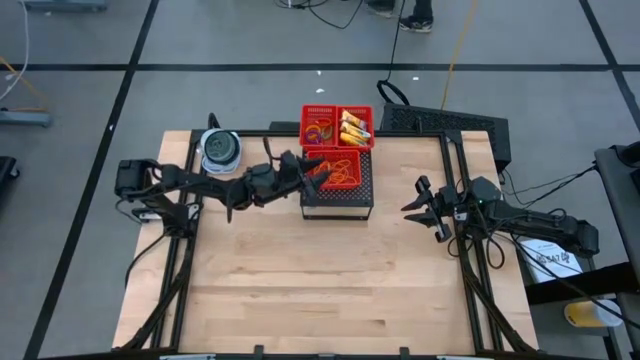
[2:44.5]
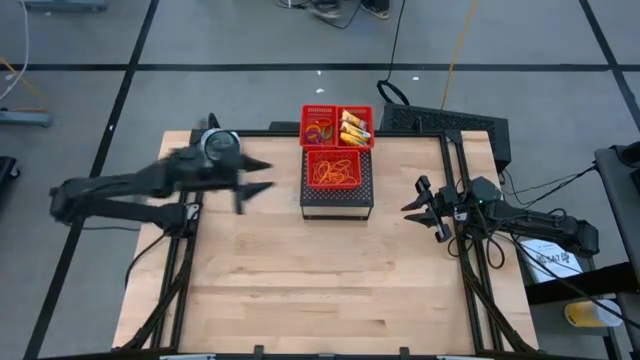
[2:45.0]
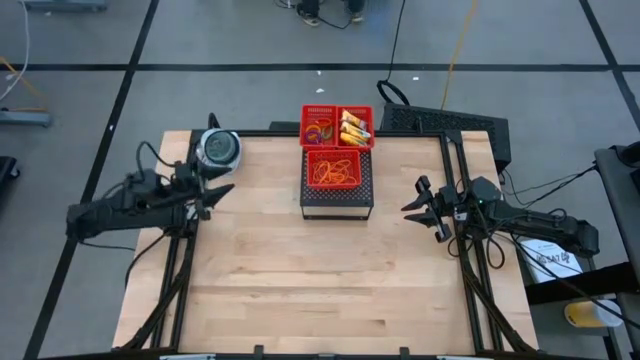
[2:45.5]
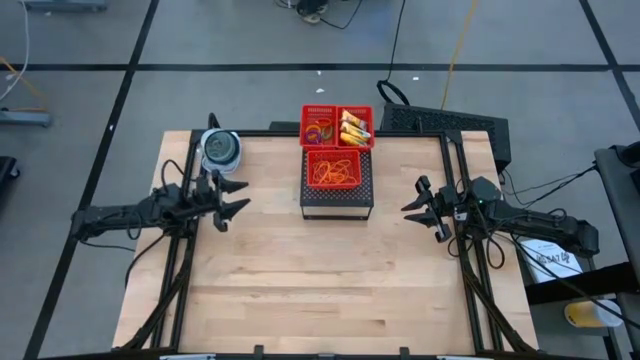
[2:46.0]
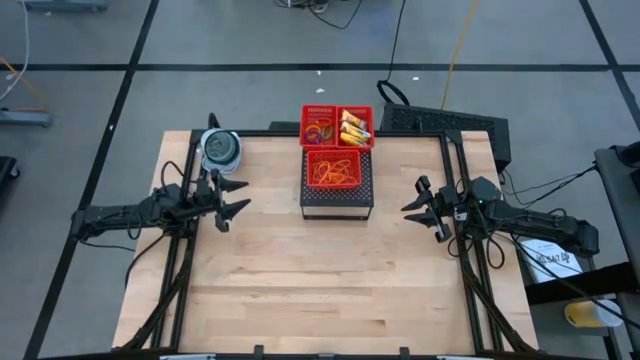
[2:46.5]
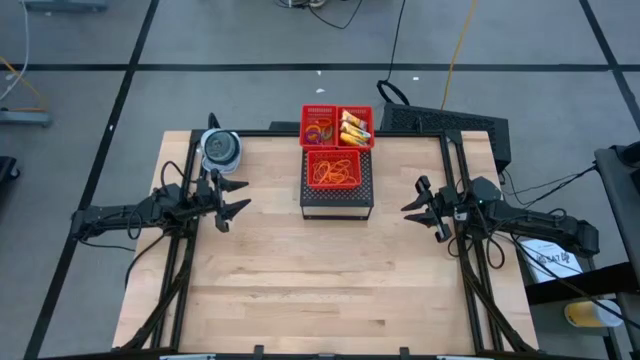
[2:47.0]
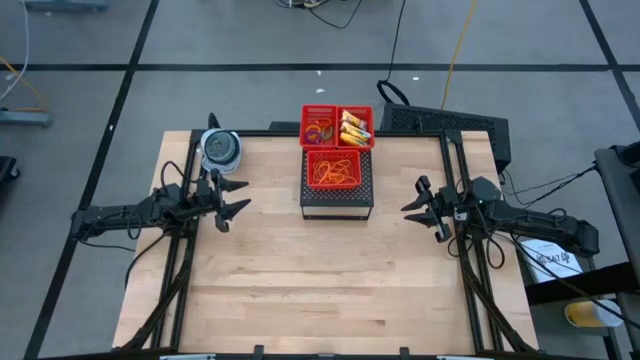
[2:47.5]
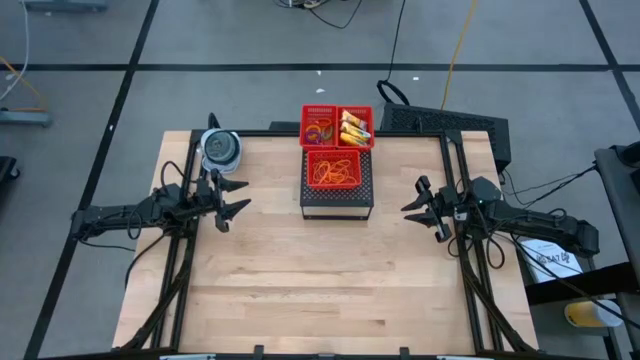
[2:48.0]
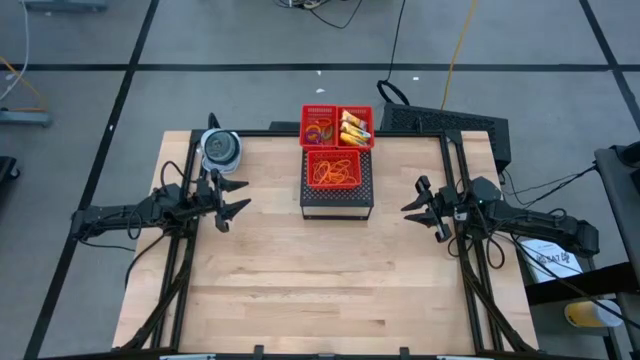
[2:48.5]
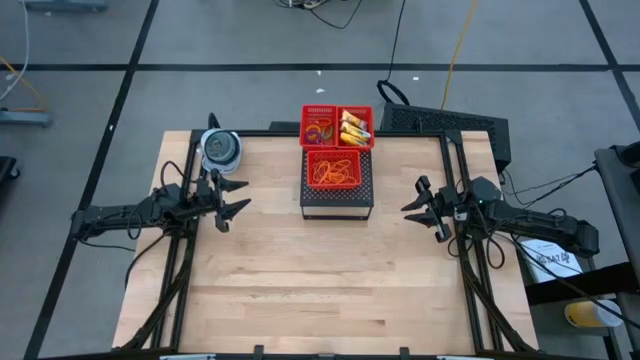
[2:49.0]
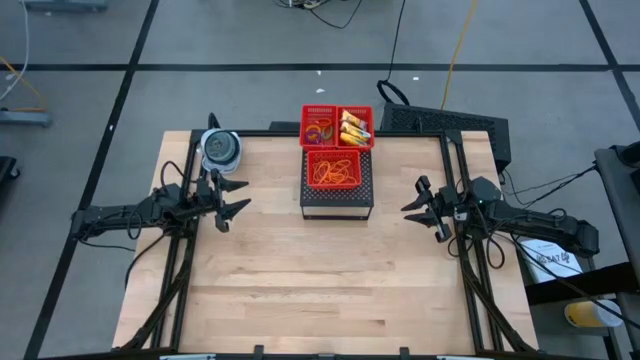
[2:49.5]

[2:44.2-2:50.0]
Task: Pick & Place Office Desk Supplies
Return to Home Position

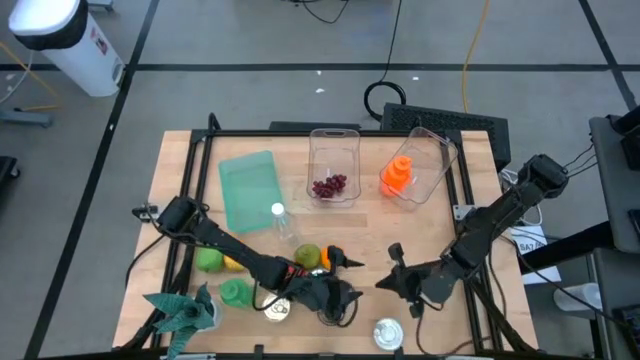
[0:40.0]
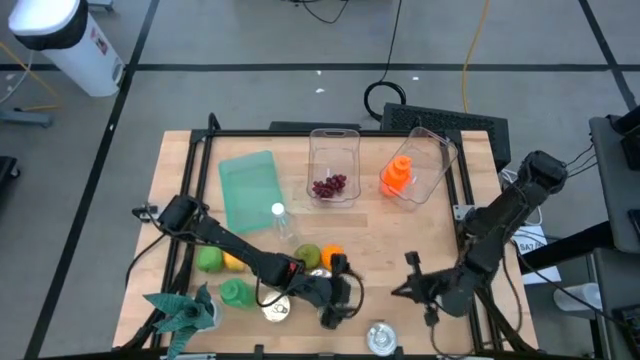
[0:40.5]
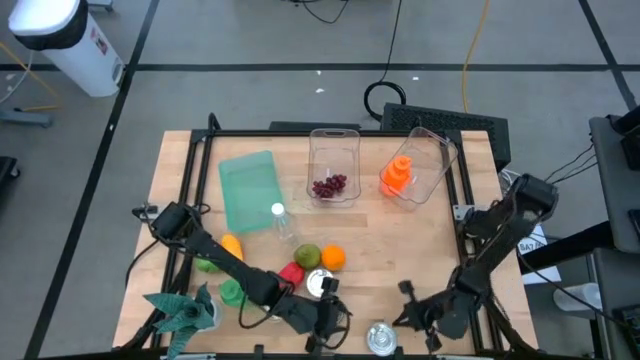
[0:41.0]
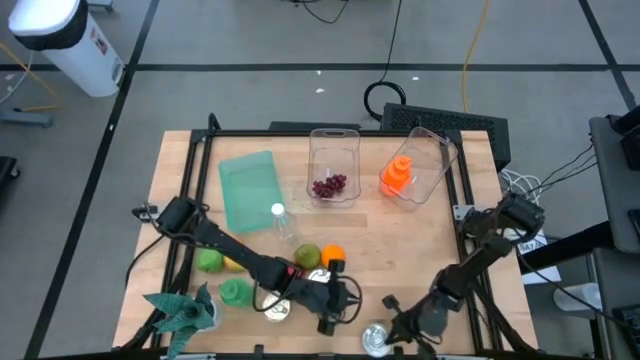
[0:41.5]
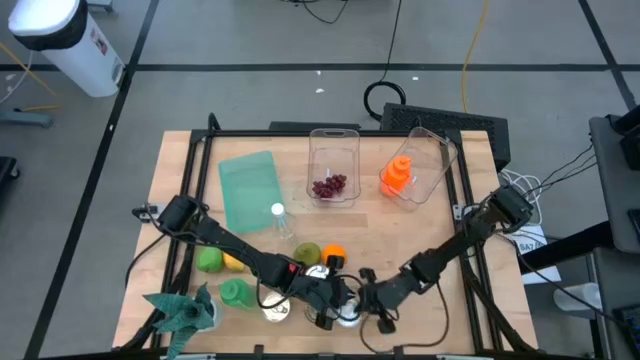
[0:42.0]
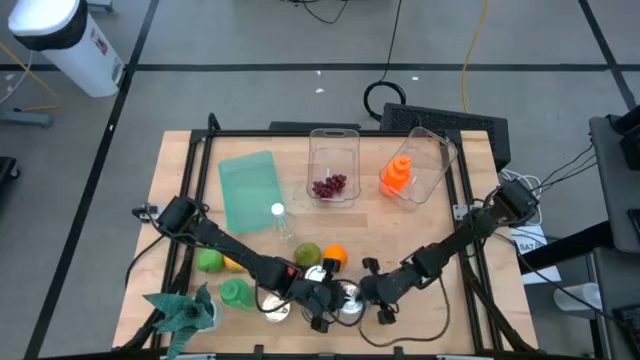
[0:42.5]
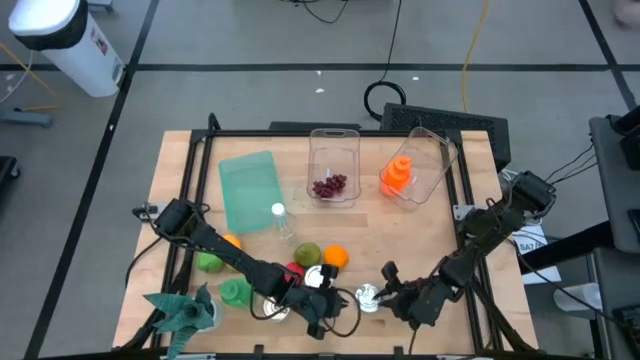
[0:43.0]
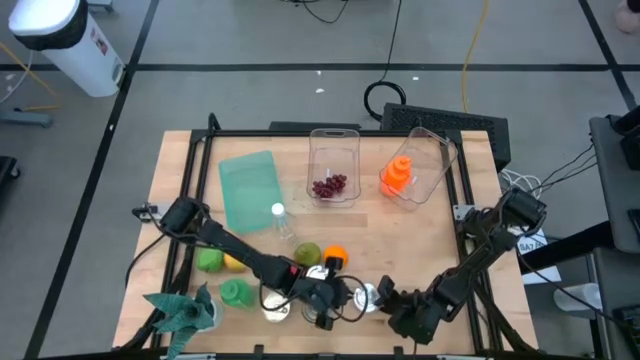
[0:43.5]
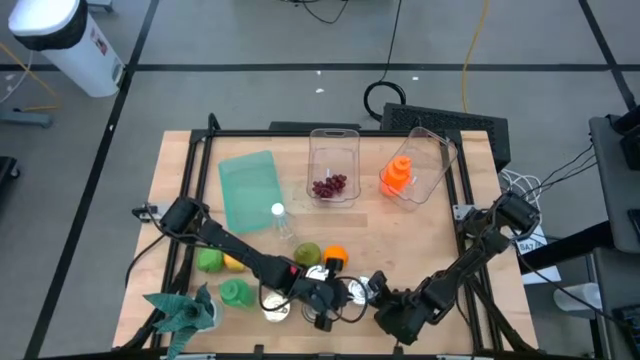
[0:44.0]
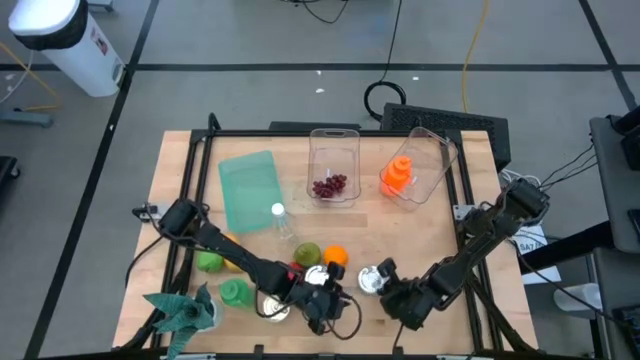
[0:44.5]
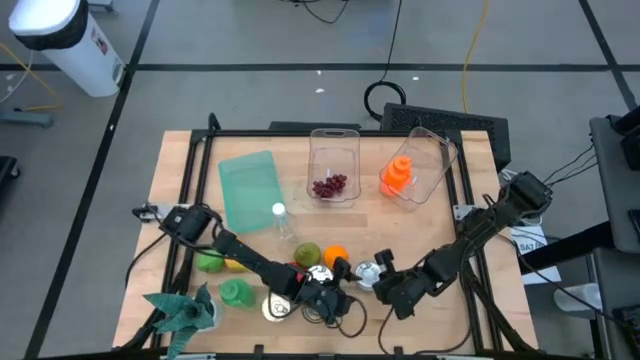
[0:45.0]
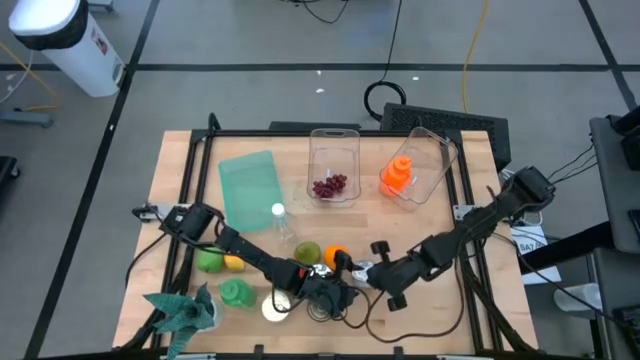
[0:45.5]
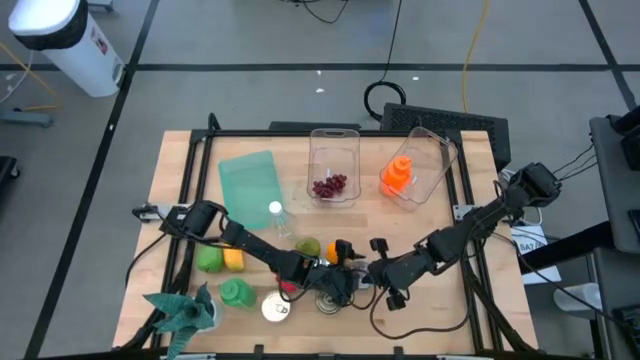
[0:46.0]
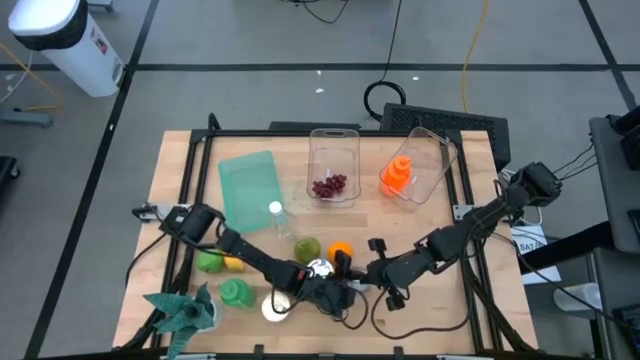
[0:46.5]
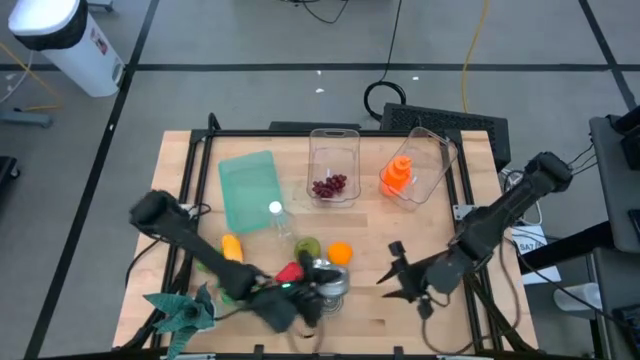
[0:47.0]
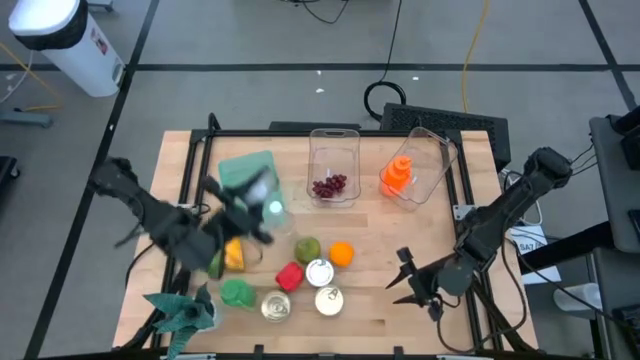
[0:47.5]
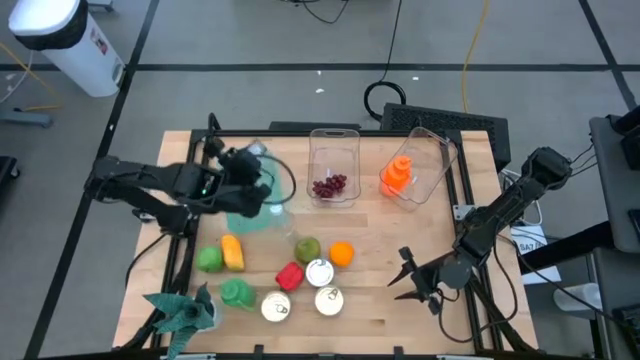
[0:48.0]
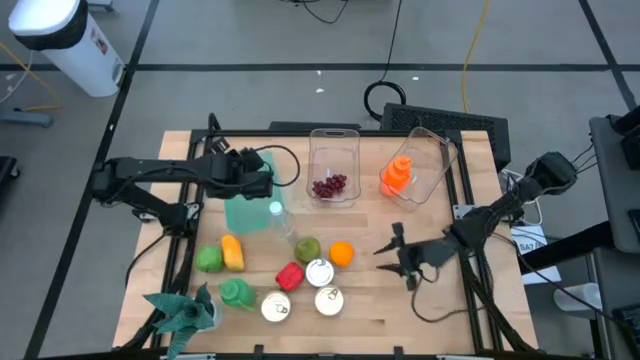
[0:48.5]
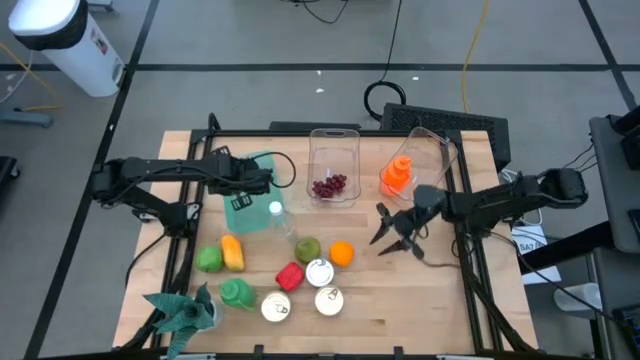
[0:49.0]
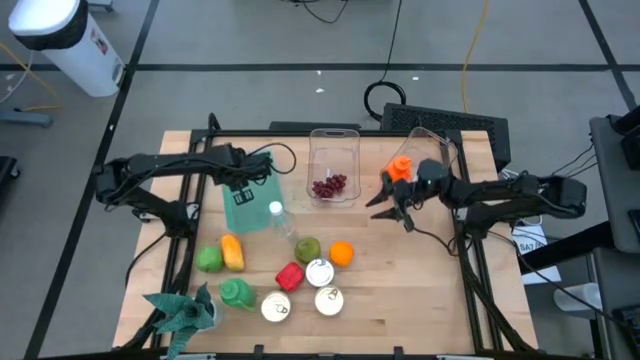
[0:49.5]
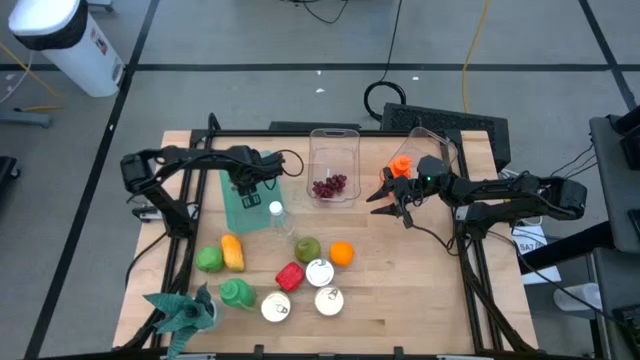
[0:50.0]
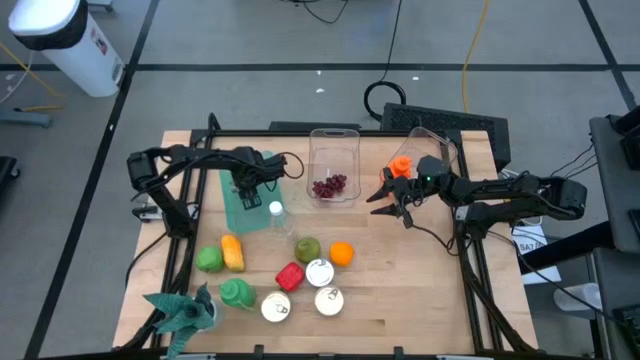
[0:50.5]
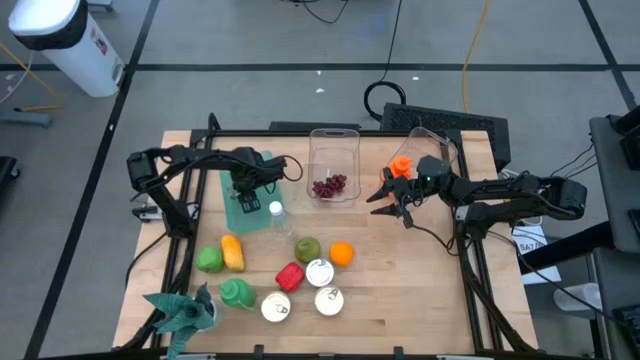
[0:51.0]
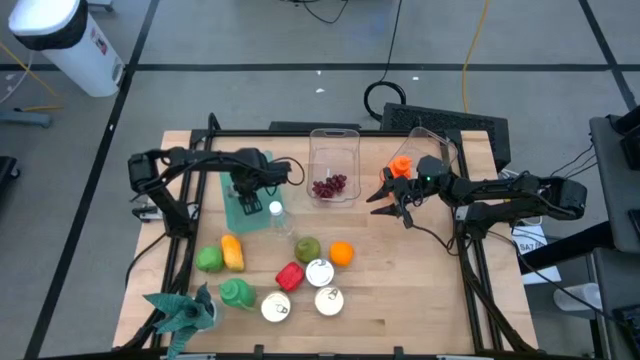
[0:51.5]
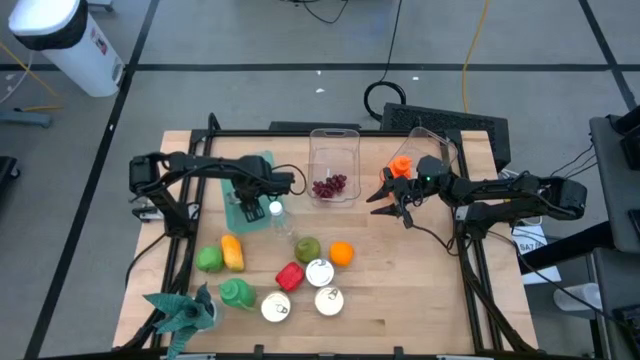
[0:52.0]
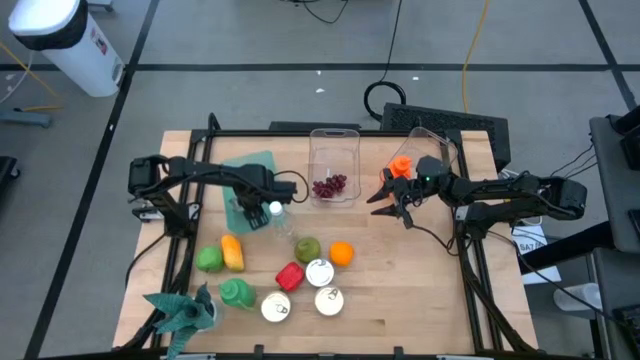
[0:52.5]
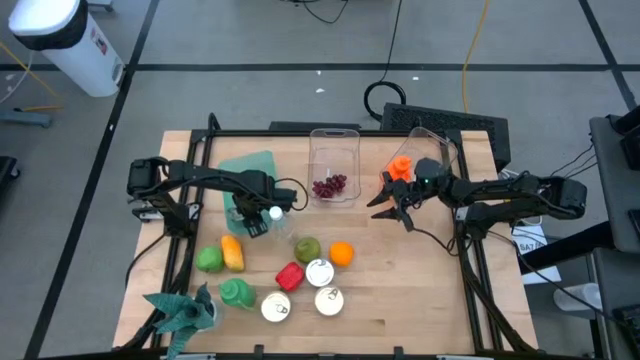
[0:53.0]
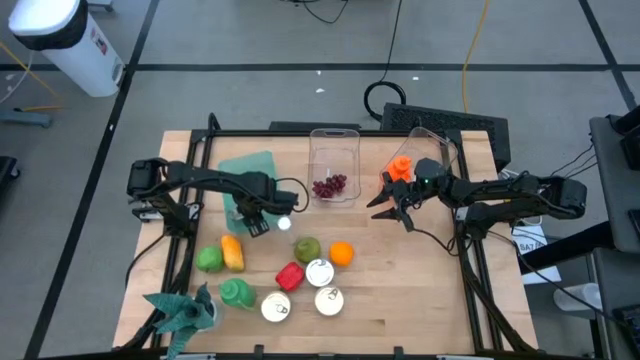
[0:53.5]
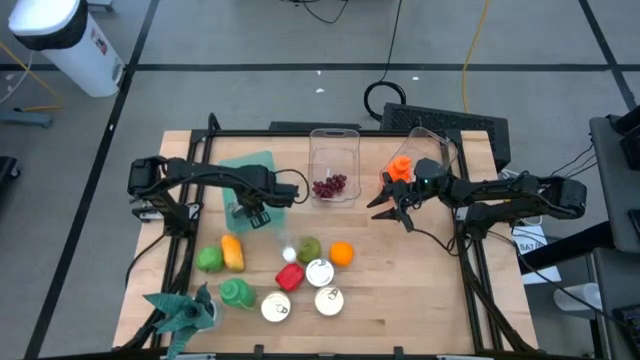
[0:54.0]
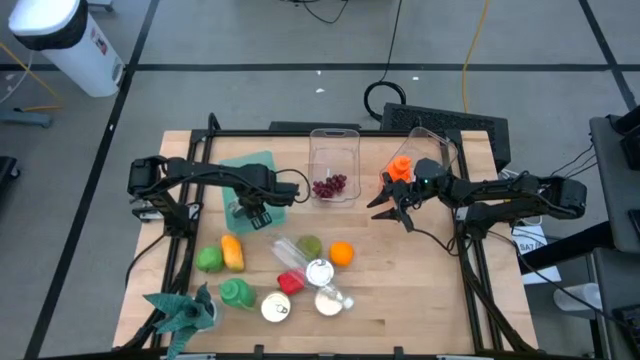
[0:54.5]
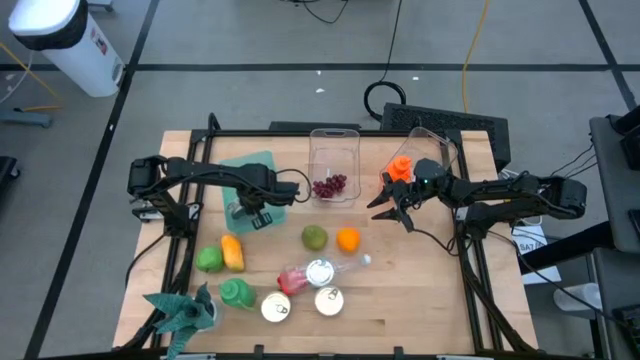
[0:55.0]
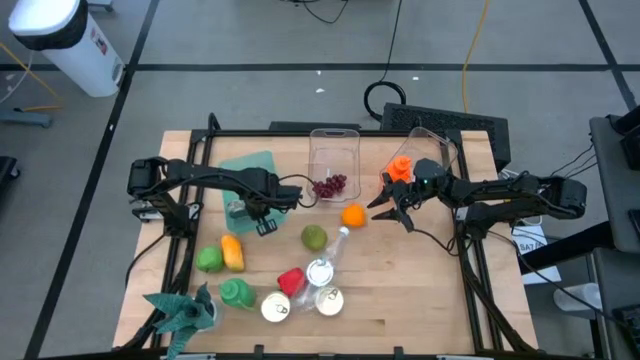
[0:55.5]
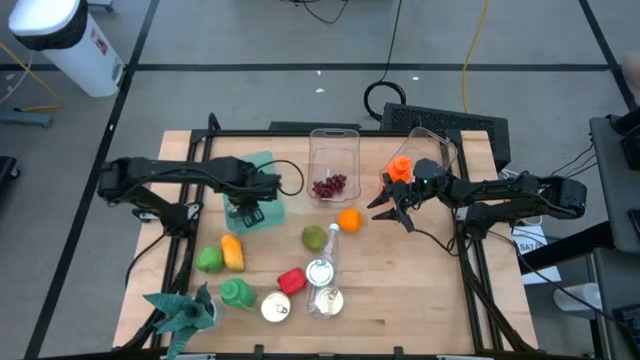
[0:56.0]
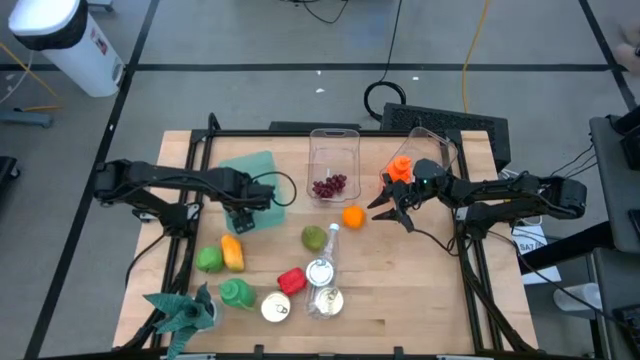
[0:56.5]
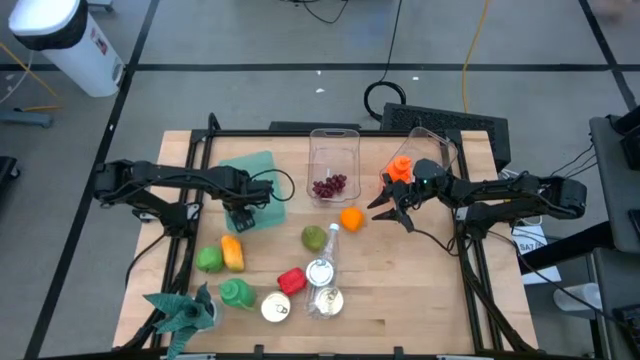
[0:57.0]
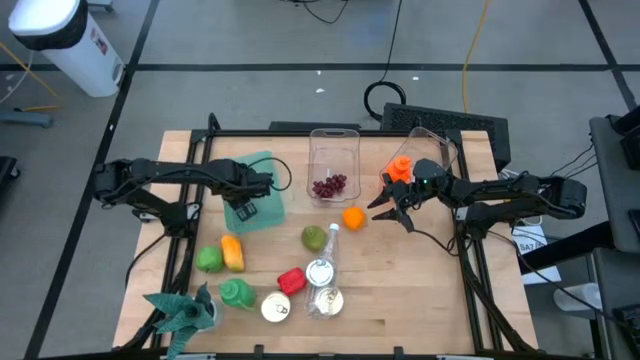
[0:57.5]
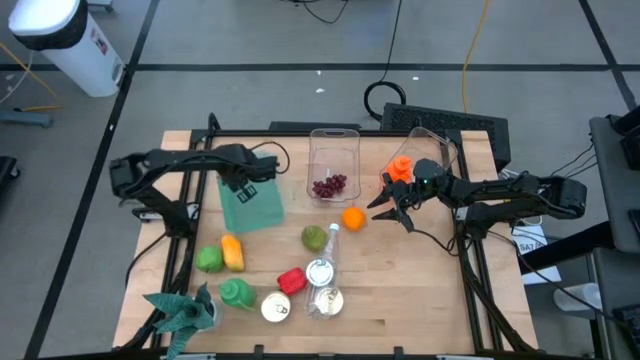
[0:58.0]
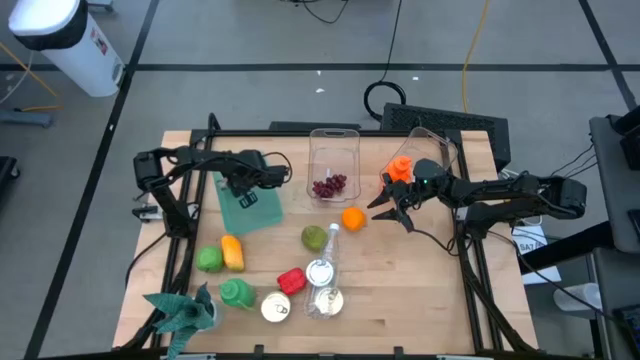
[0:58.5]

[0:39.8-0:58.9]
Task: Pick & Place Food Item
Put the bottom green tuna can into the green bin
